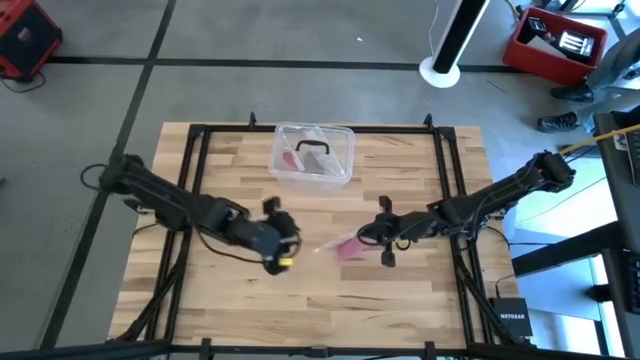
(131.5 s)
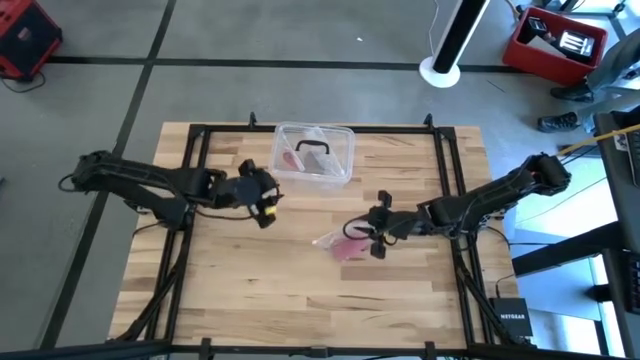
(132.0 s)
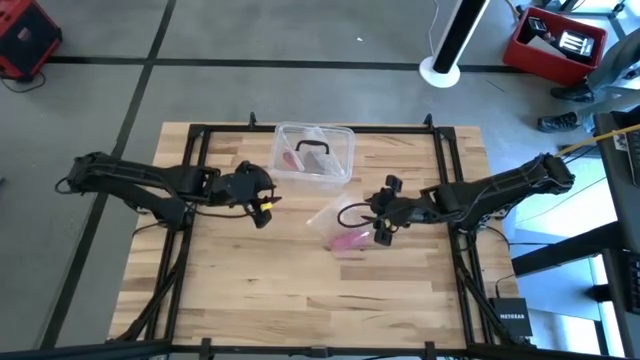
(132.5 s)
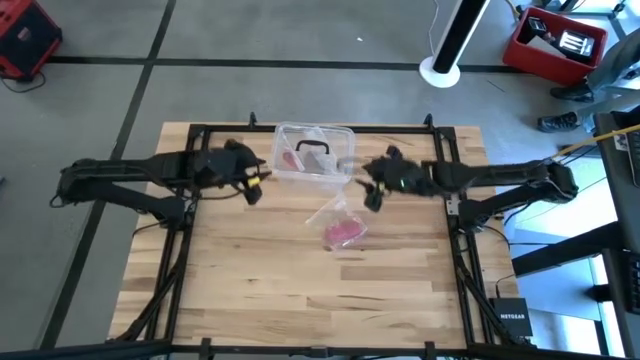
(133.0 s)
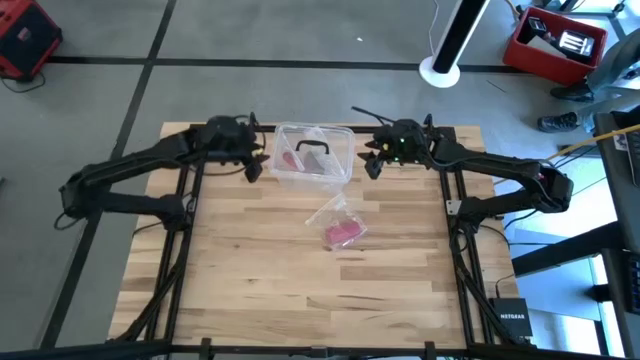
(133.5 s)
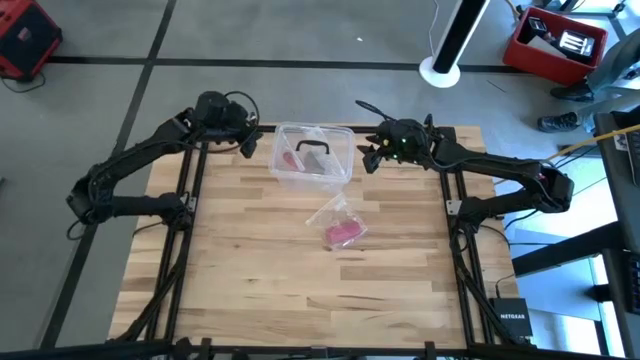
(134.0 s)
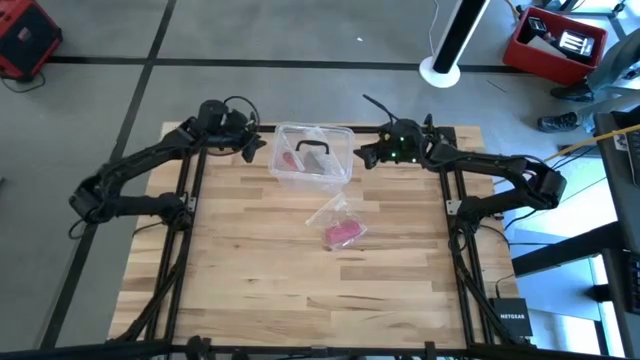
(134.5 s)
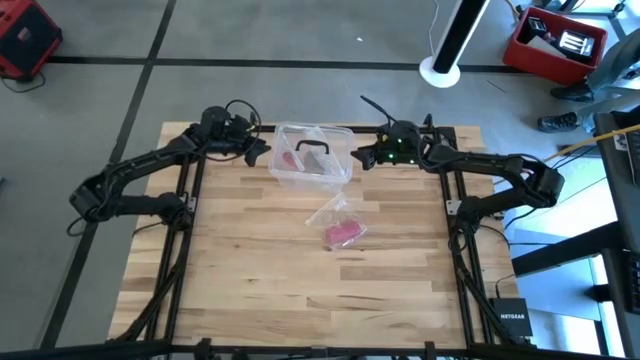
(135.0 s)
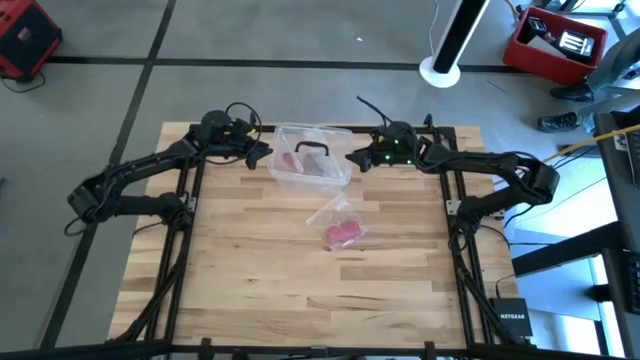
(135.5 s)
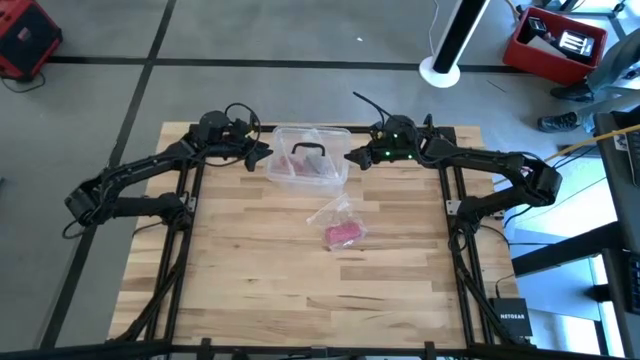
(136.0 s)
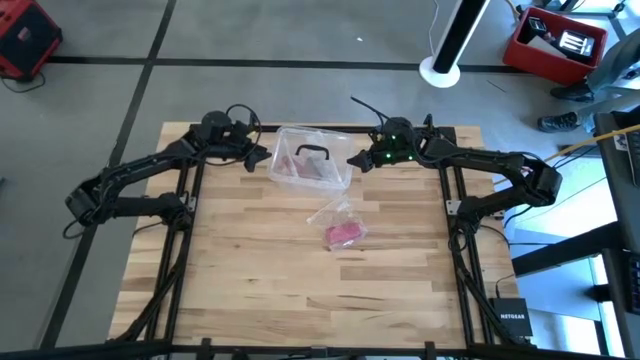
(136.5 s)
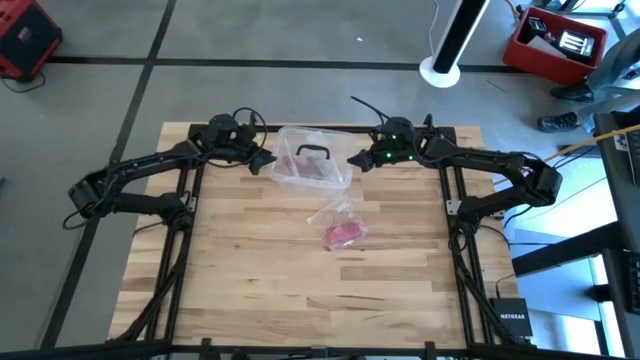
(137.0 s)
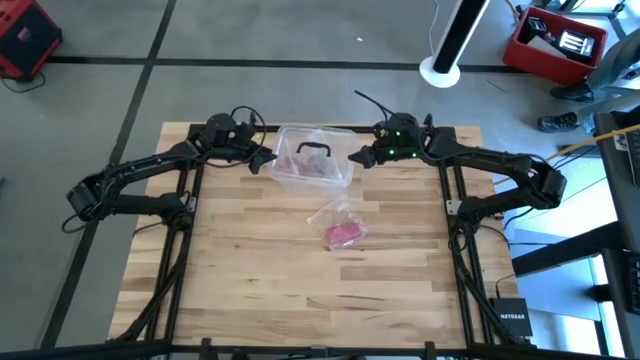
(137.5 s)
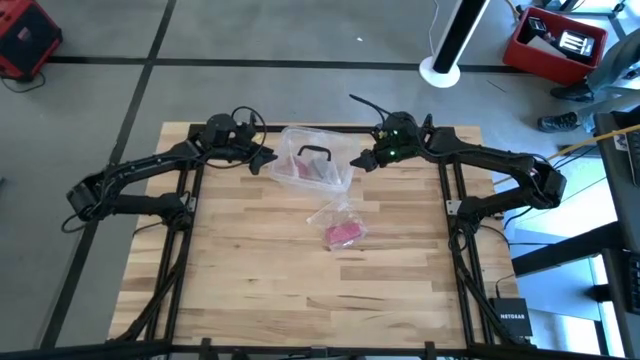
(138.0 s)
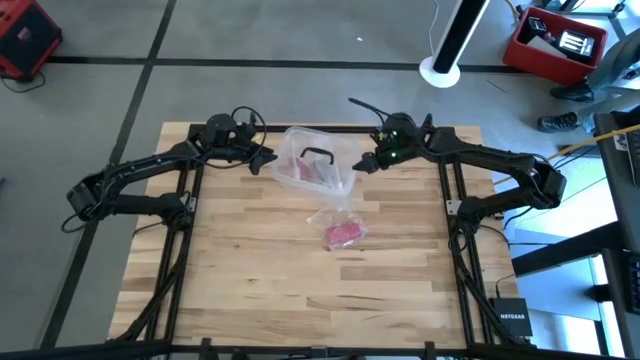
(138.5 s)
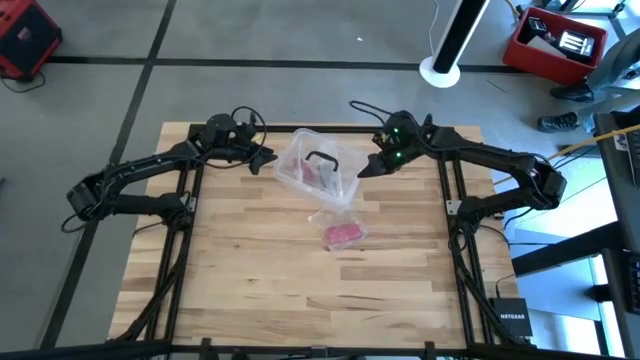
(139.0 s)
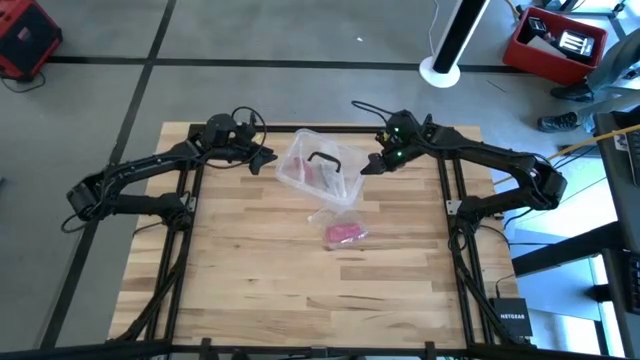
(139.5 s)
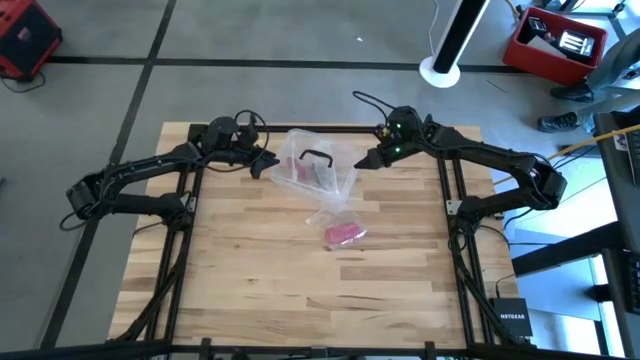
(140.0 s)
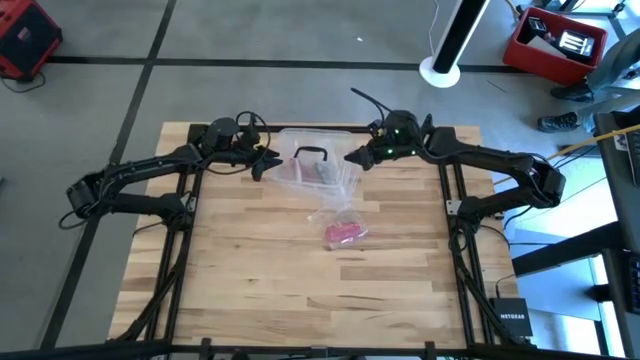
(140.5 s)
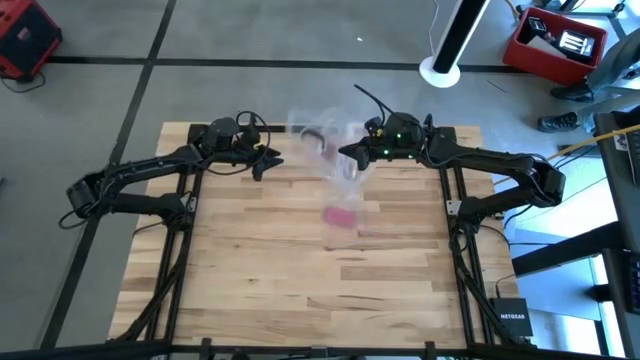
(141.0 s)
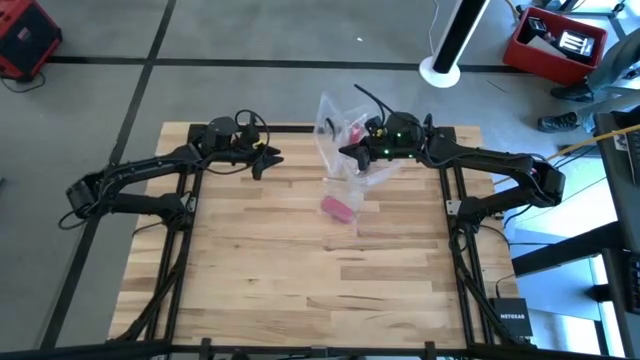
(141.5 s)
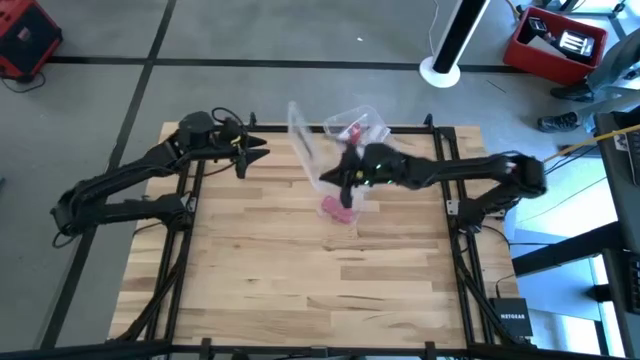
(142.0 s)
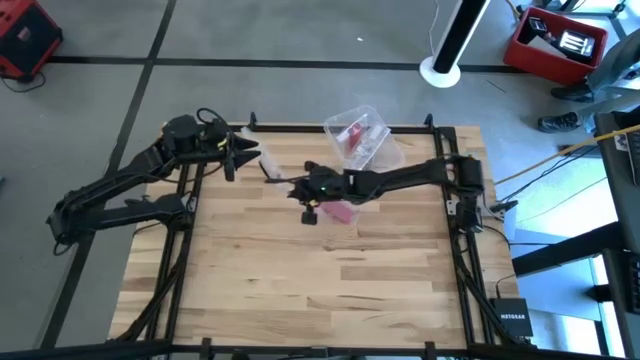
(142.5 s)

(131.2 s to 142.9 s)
Task: Roll bandage
Open the transparent bin

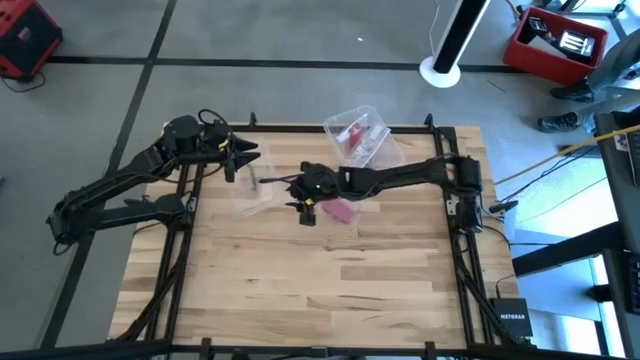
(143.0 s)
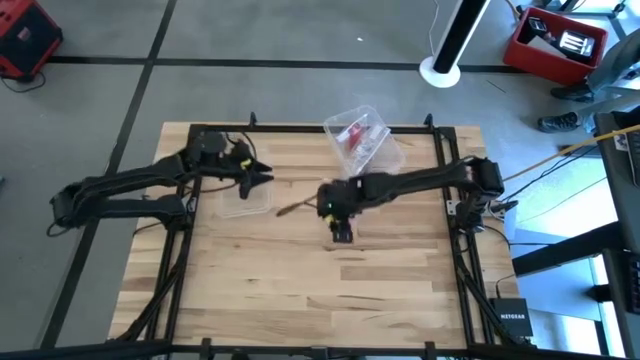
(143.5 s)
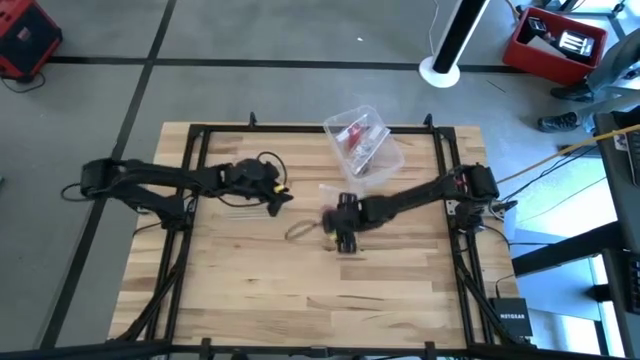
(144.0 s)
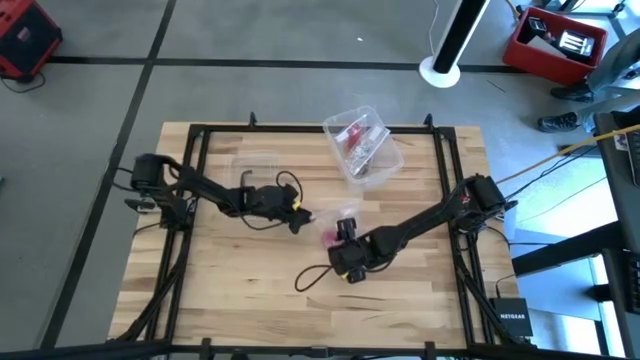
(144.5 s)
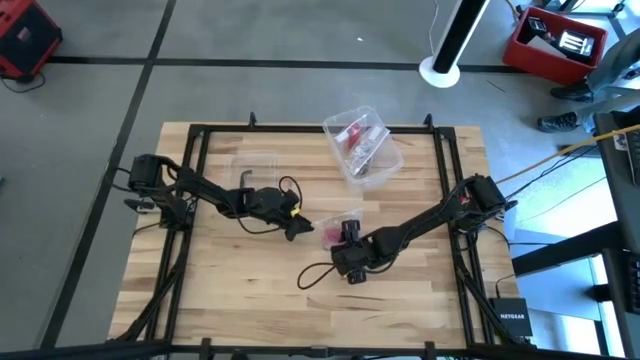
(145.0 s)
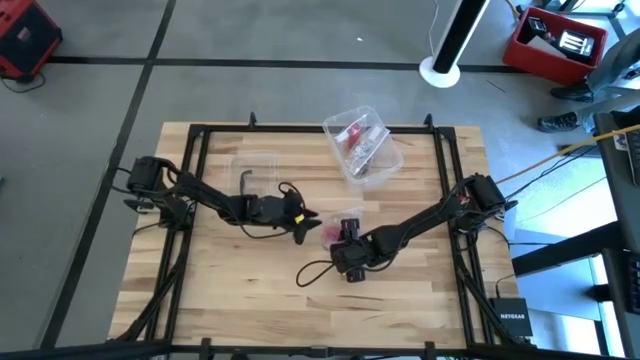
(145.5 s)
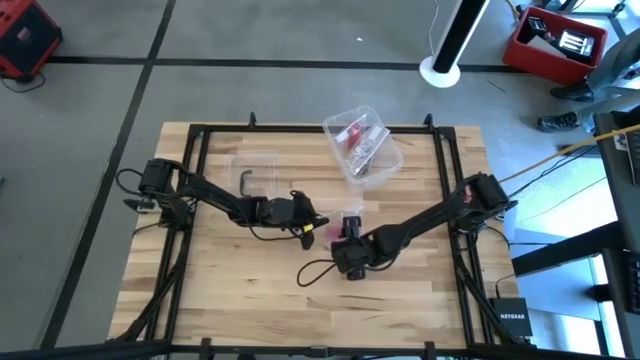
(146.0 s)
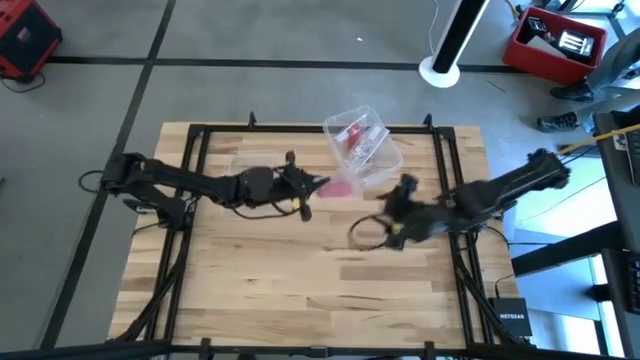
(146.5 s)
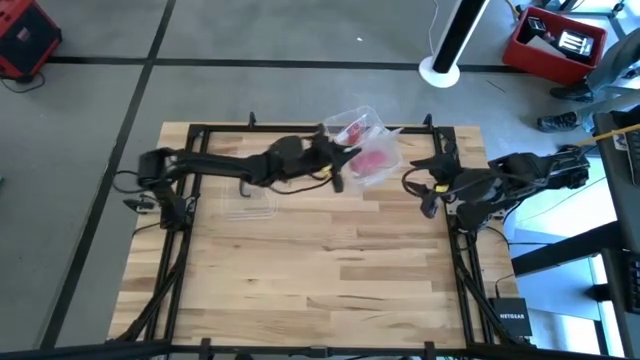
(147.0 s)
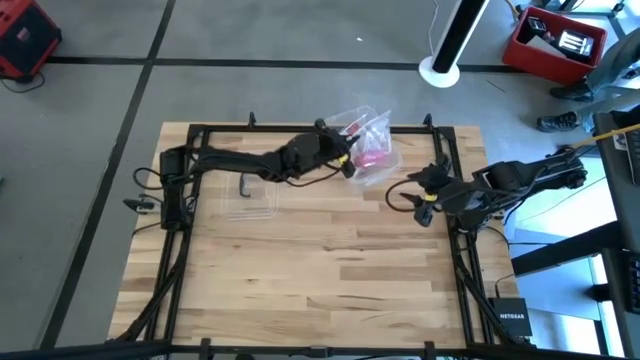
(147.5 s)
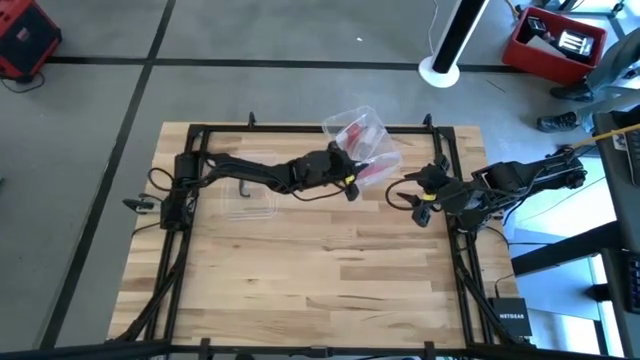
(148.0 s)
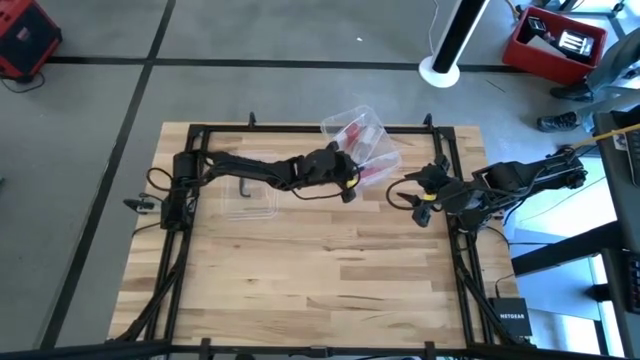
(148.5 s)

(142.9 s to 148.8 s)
Put the transparent zip bag into the transparent bin

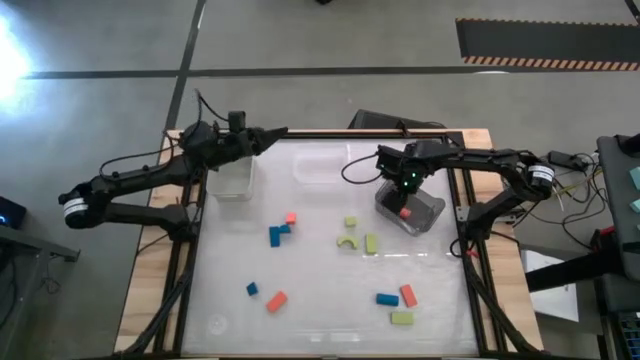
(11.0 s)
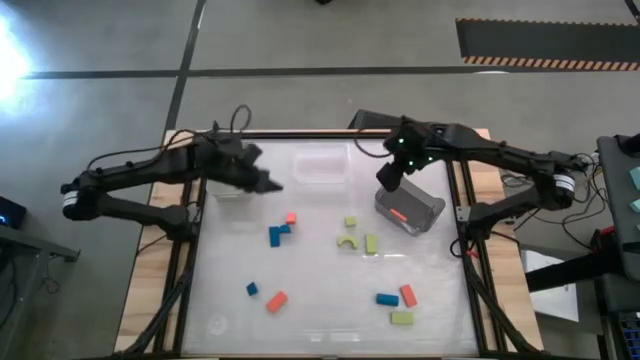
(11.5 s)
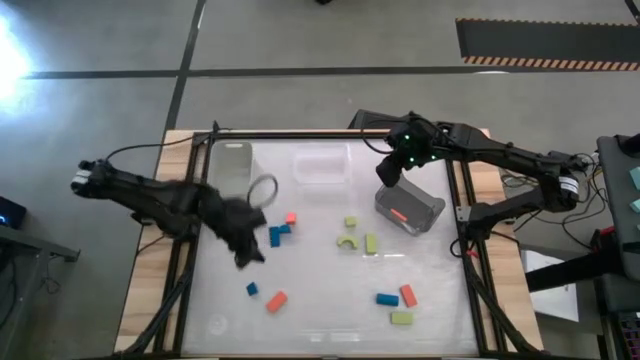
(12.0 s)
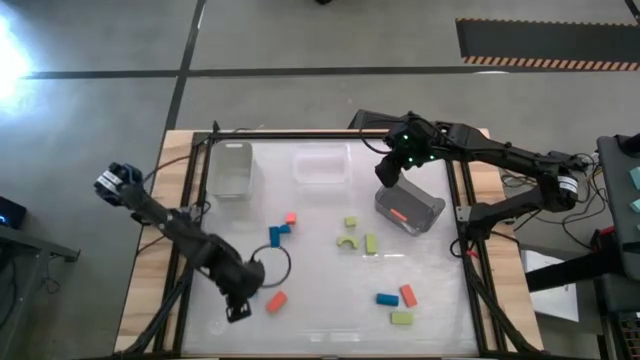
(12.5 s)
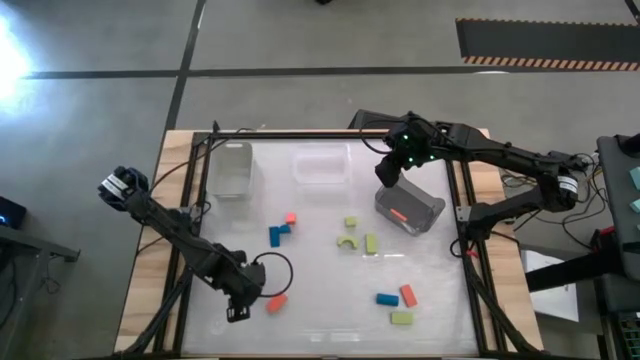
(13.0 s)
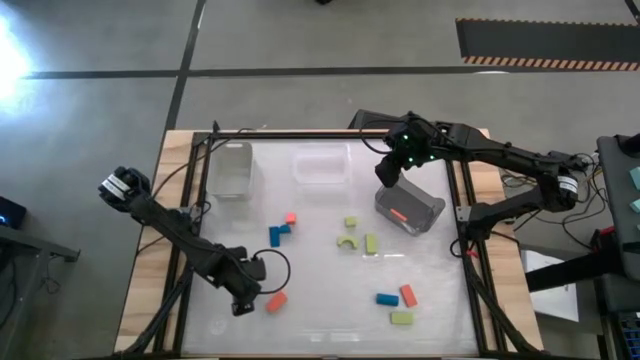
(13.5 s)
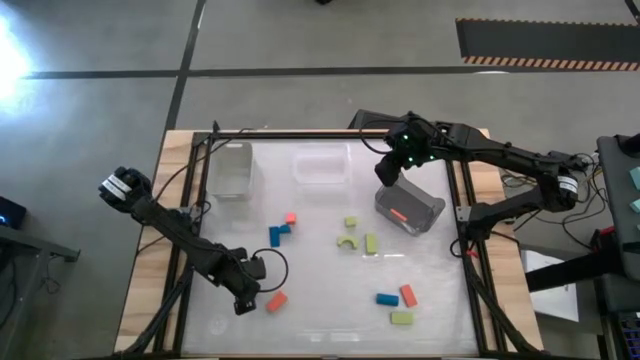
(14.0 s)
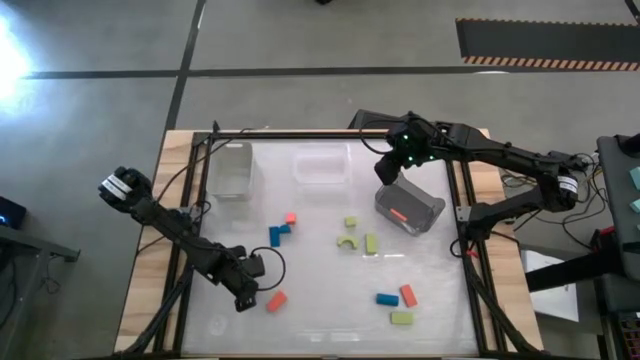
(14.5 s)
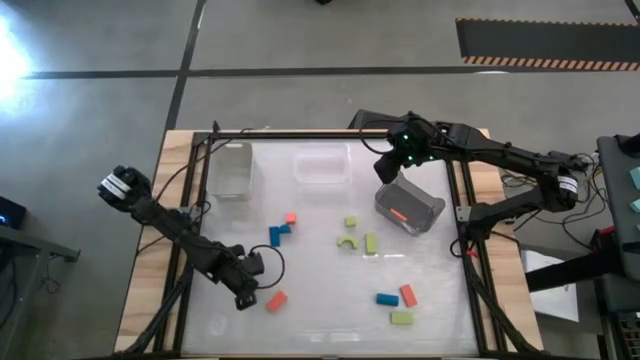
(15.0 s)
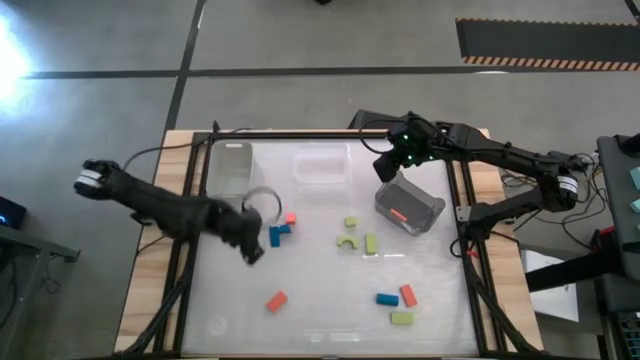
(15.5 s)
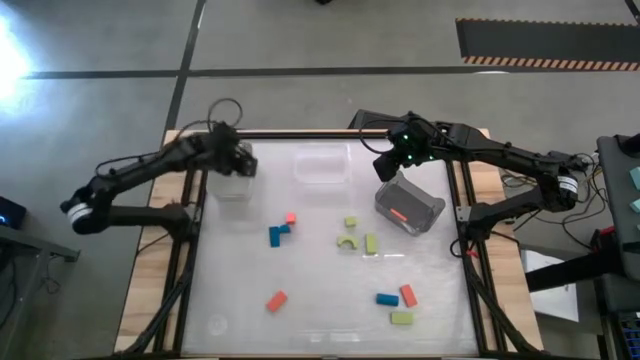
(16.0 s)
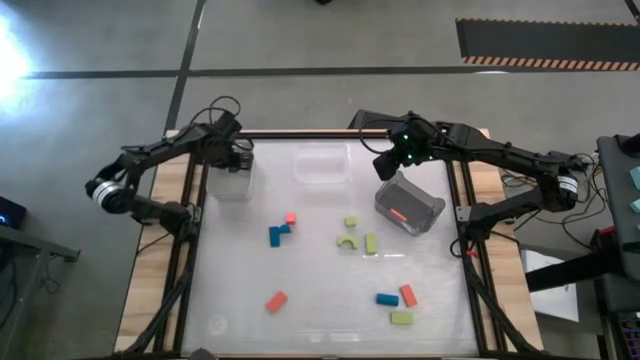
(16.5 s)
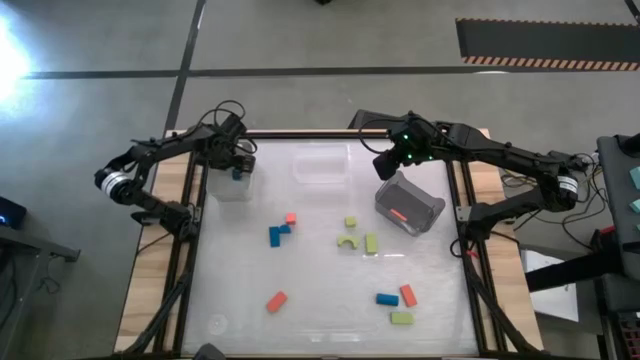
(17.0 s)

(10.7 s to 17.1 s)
Task: Sort & place blocks by color
Put the blue block into the gray bin
